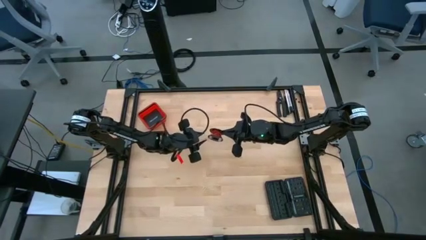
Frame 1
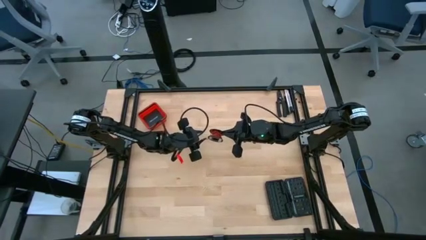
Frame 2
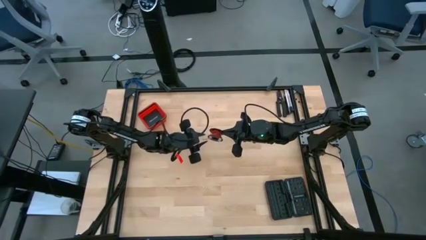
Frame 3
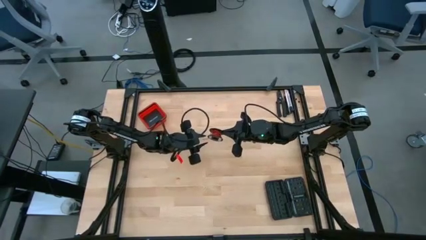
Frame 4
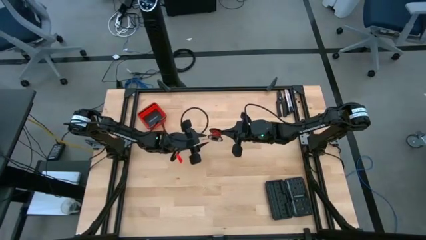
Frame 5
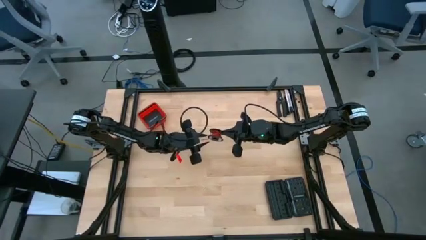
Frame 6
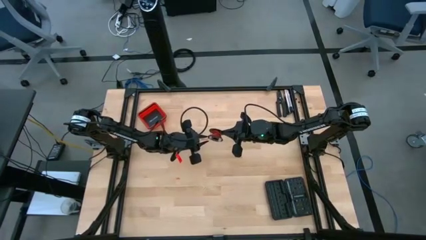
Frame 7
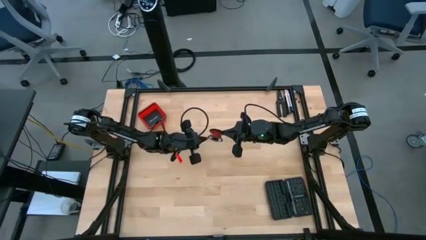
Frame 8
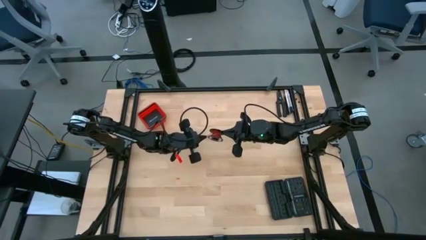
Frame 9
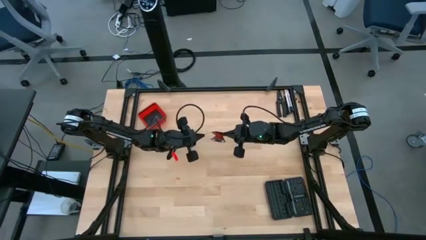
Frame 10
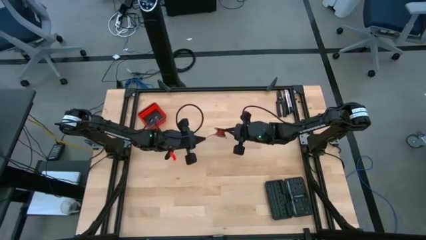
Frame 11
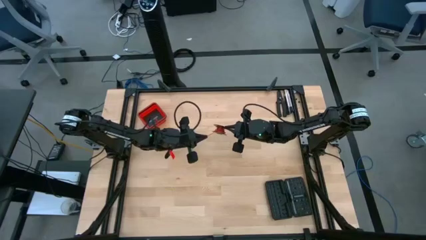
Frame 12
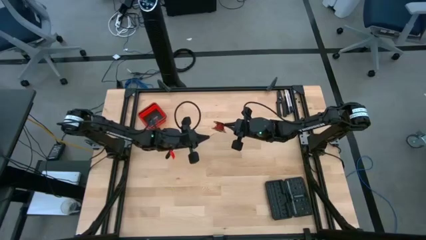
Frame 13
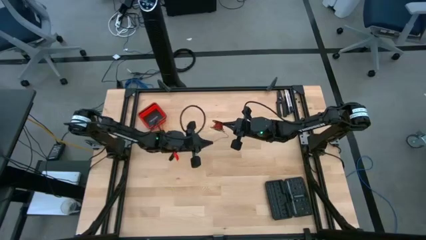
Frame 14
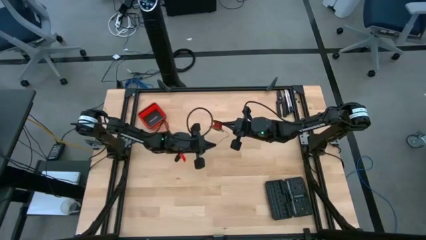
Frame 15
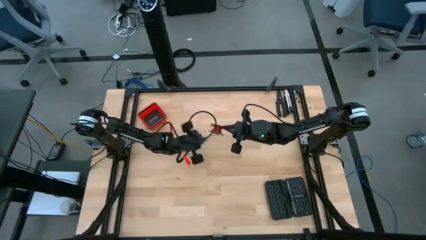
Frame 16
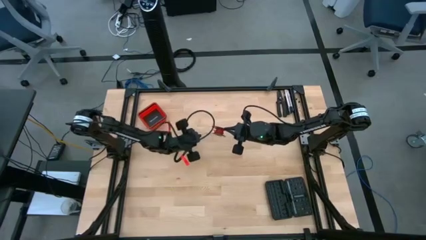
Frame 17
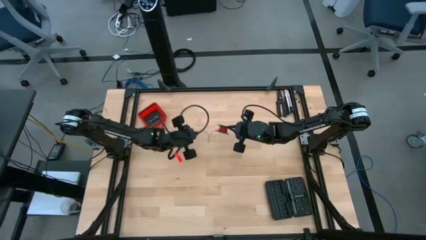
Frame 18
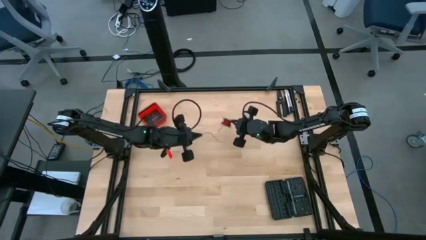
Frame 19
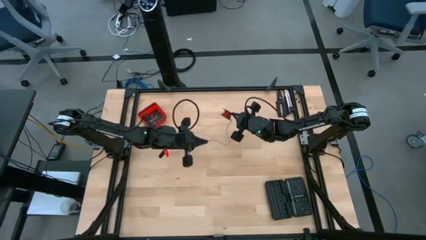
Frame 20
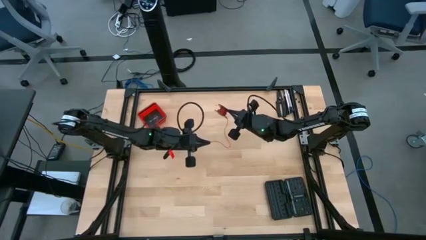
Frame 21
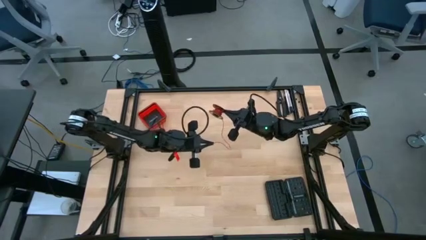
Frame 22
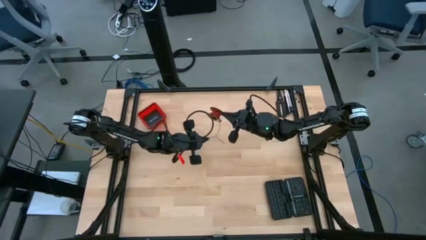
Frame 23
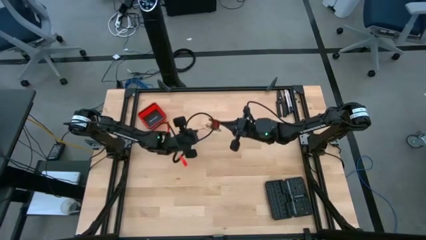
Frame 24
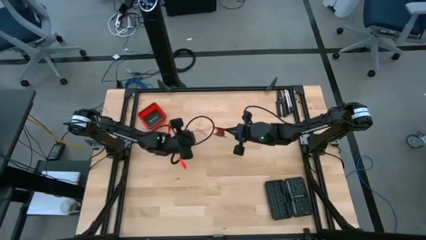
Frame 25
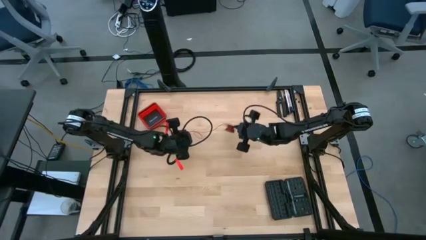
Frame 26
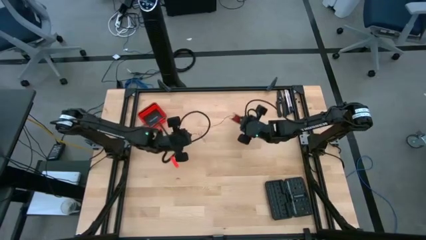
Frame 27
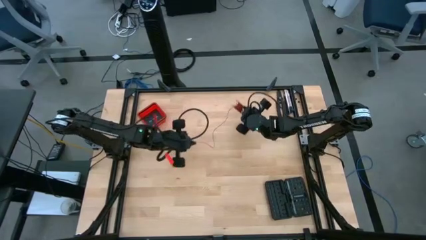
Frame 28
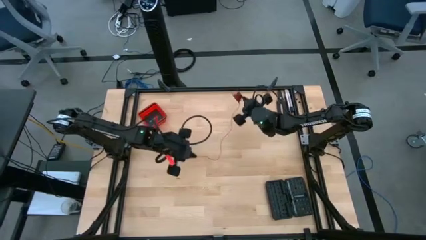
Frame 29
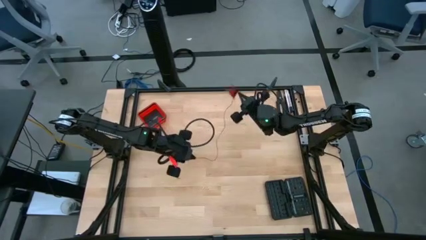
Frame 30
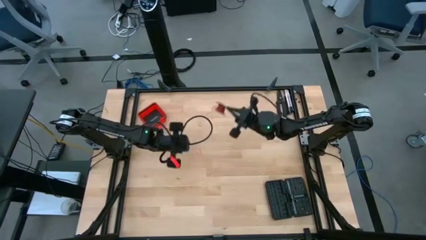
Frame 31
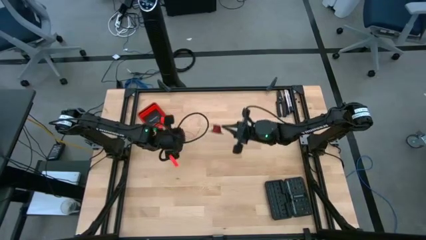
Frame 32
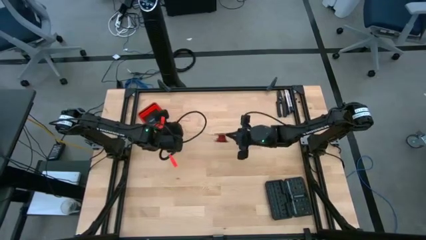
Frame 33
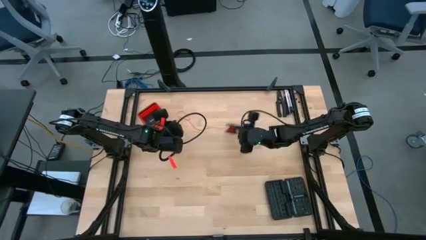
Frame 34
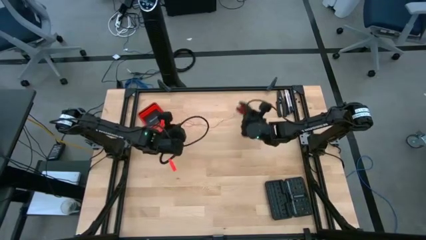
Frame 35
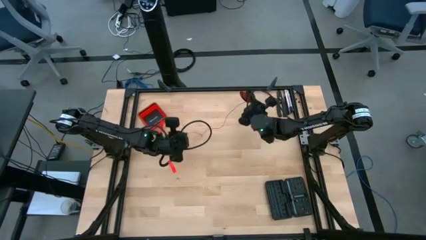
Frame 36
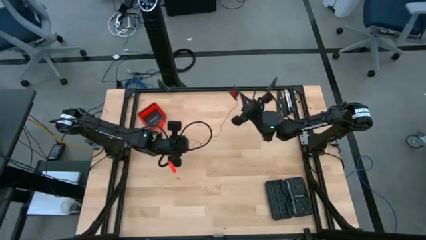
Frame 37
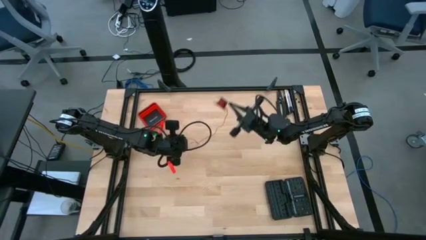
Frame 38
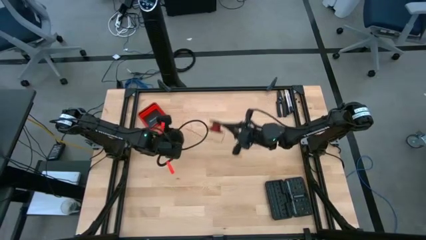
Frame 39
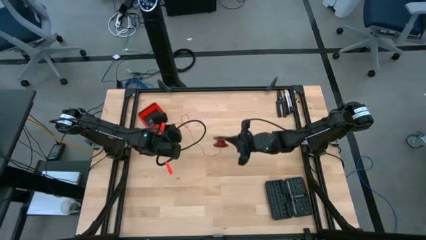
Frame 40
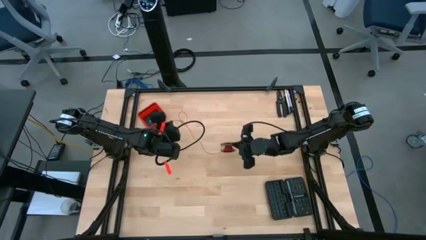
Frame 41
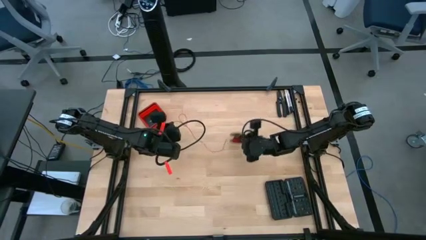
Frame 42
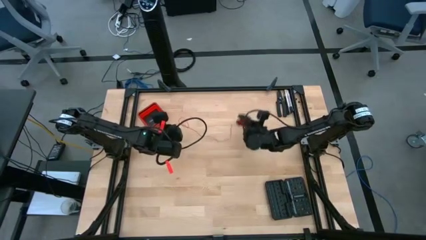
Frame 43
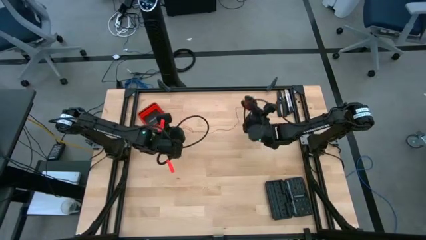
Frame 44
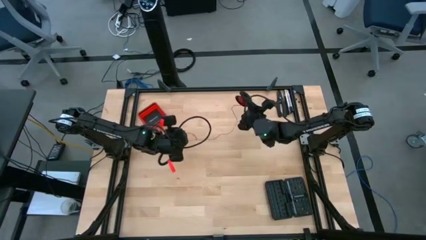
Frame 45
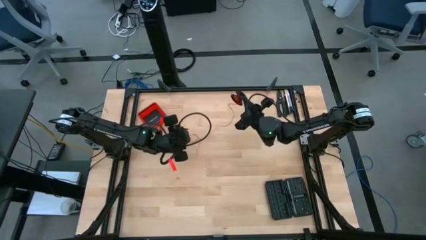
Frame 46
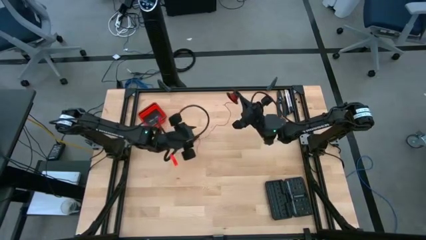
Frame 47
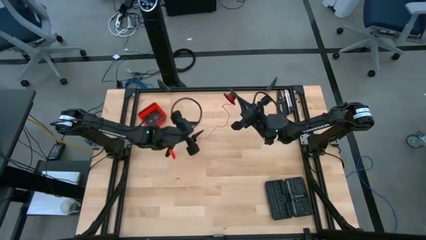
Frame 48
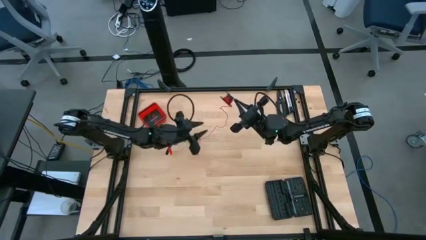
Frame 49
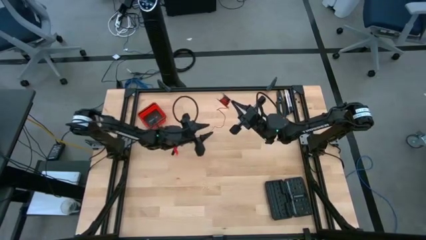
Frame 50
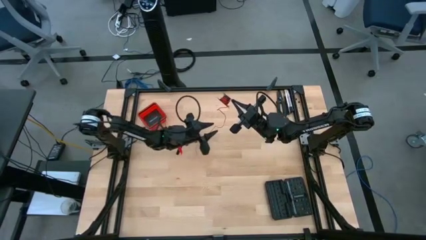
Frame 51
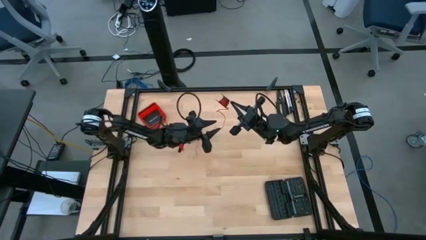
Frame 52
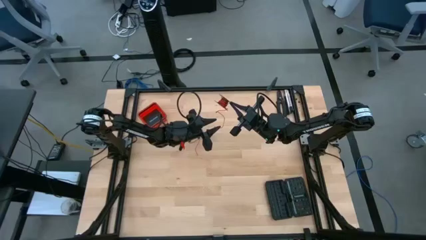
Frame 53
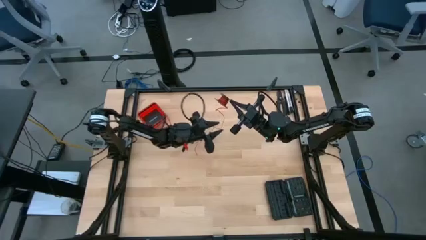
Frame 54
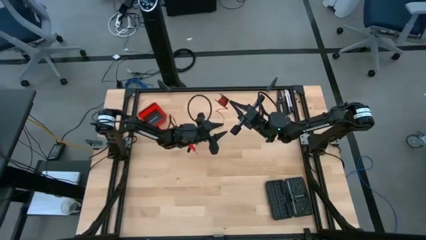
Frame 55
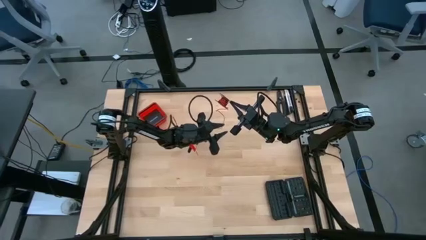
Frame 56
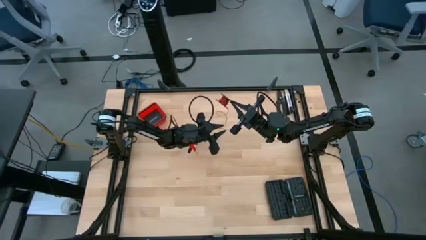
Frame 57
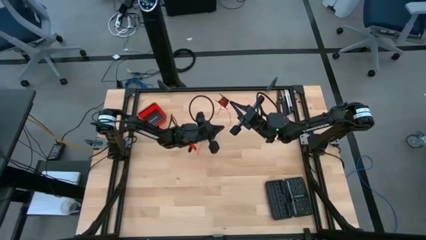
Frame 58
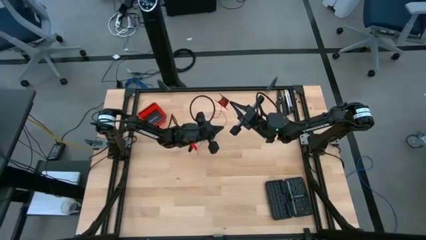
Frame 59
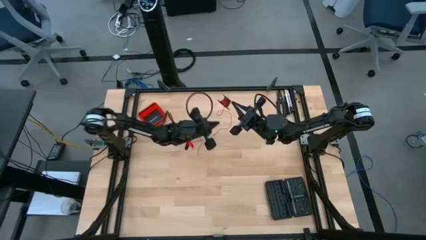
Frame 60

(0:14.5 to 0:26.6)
Task: Coil cords
Uncoil the wire to the spool
